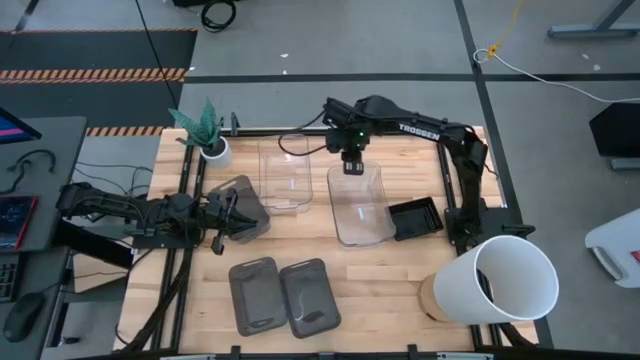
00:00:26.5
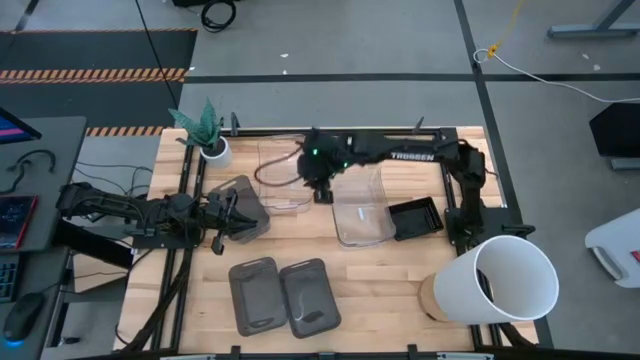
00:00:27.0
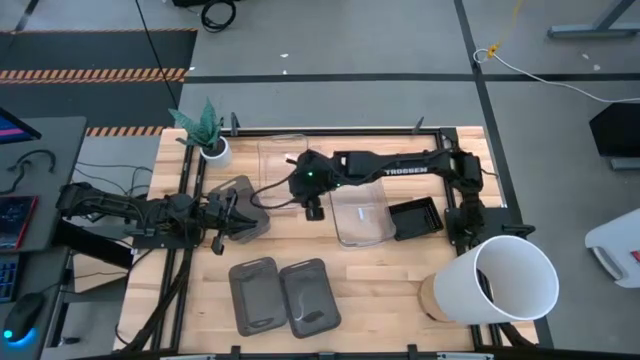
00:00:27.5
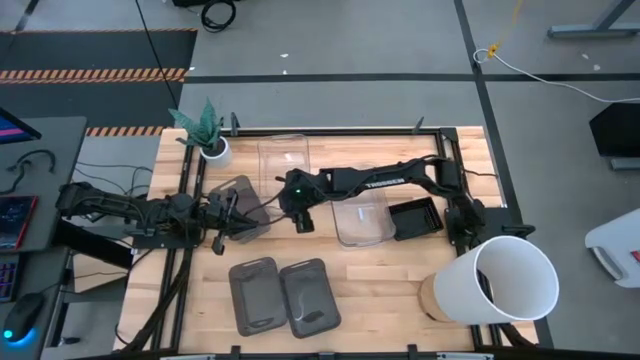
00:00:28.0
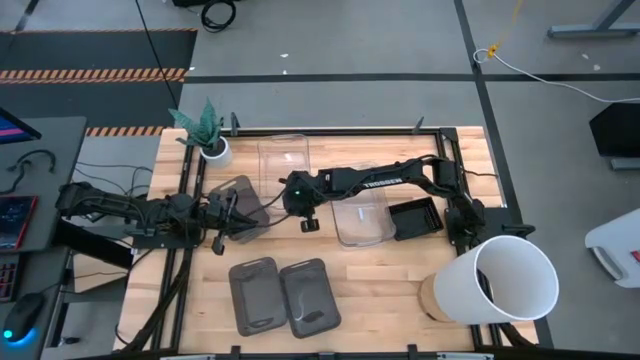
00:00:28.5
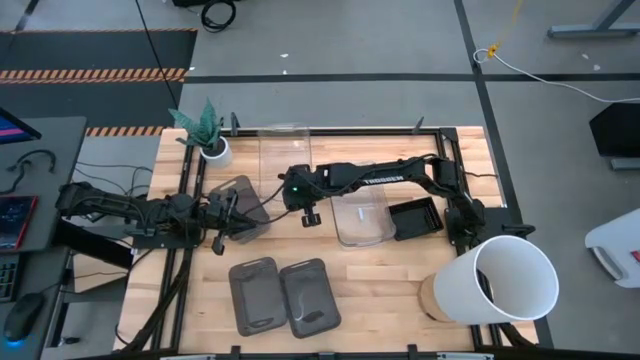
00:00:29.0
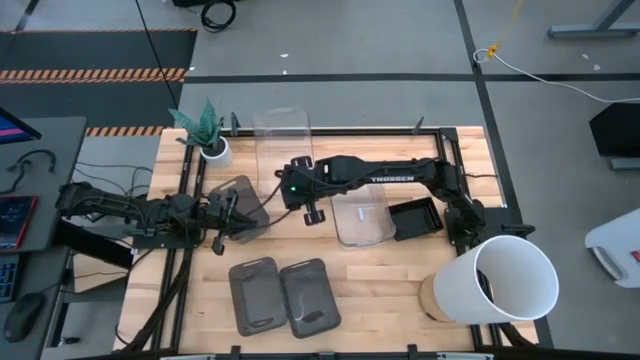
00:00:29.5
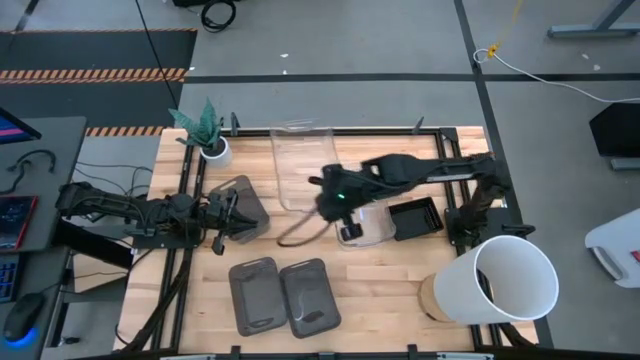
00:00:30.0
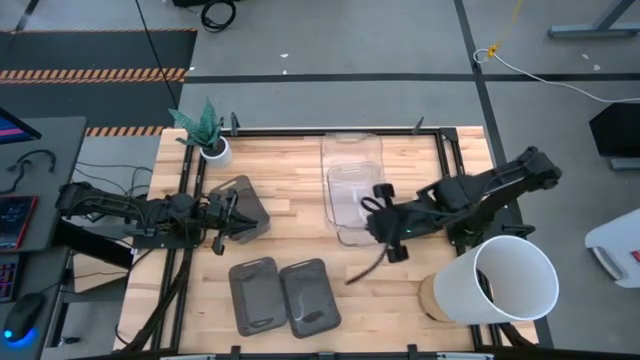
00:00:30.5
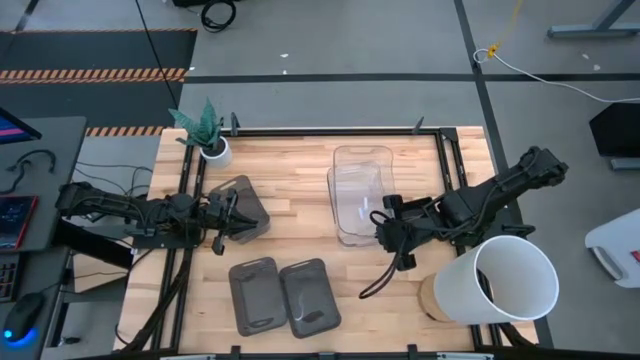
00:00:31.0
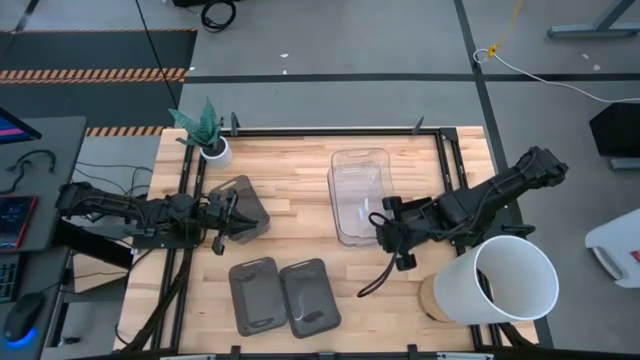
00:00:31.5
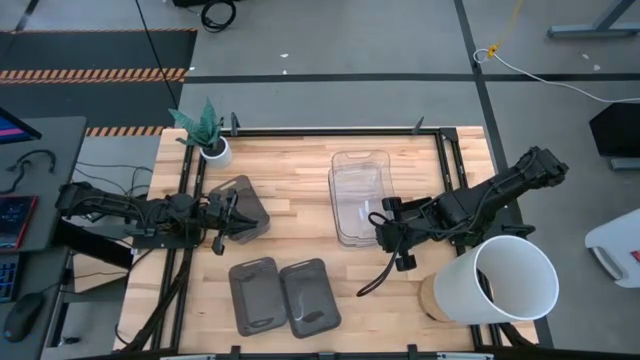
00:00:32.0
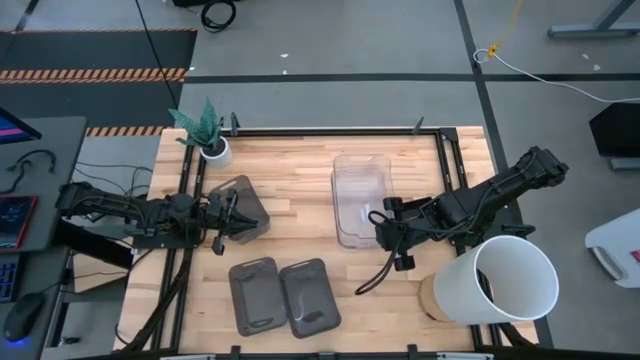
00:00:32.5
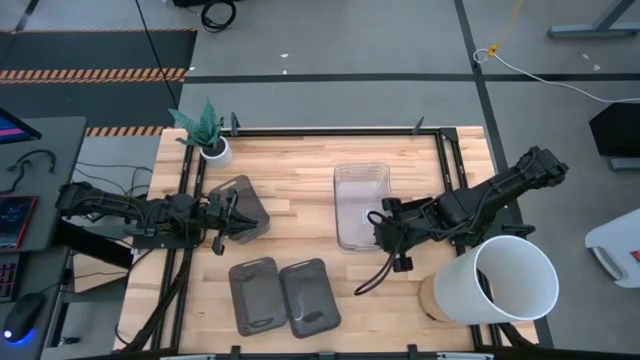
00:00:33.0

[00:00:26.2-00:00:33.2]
Stack the left transparent bin on the stacked right transparent bin

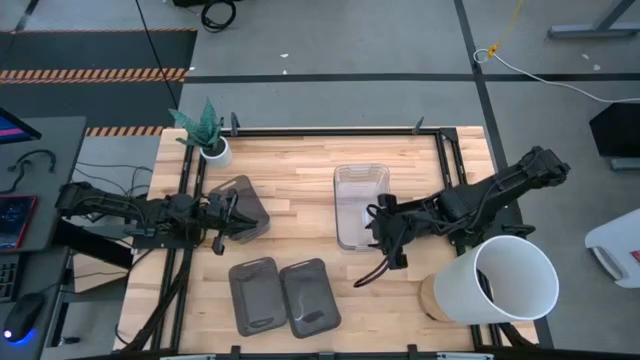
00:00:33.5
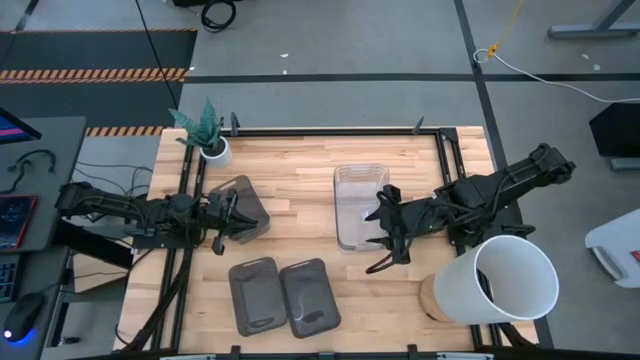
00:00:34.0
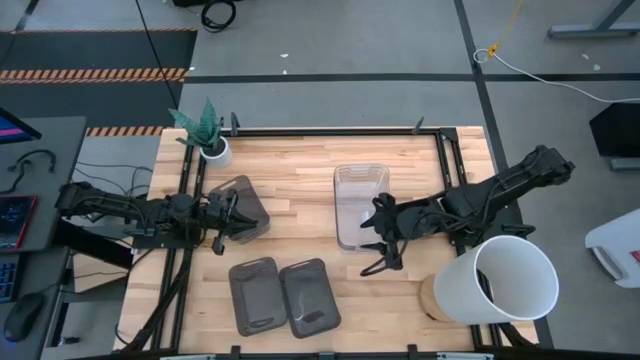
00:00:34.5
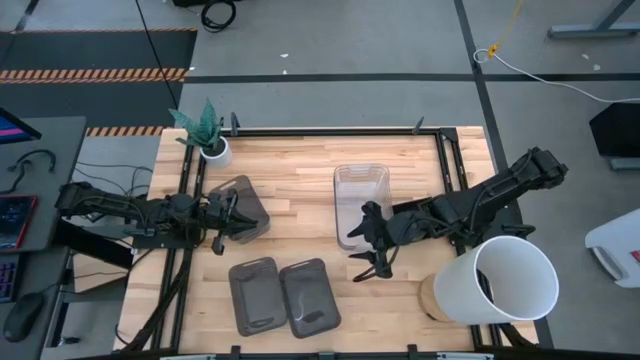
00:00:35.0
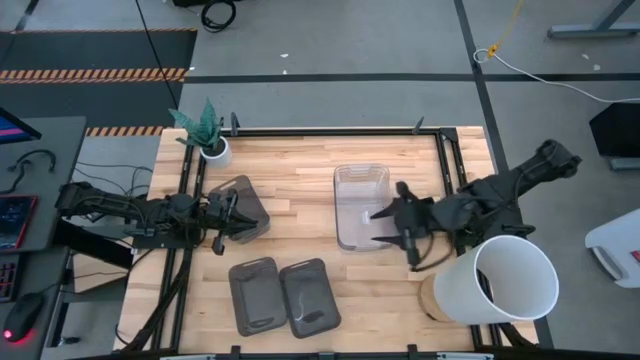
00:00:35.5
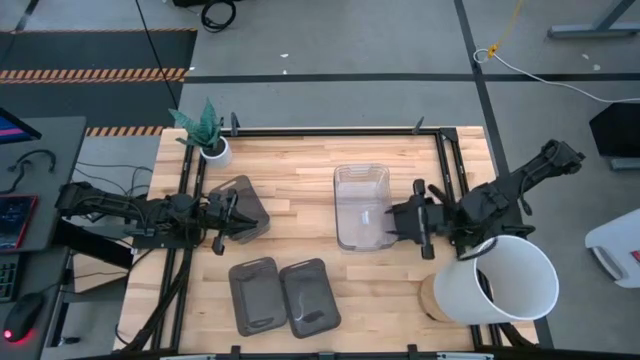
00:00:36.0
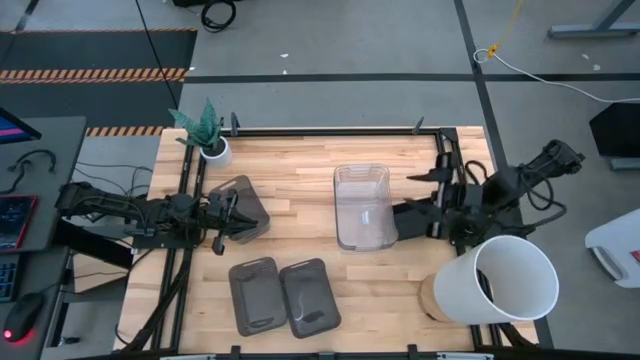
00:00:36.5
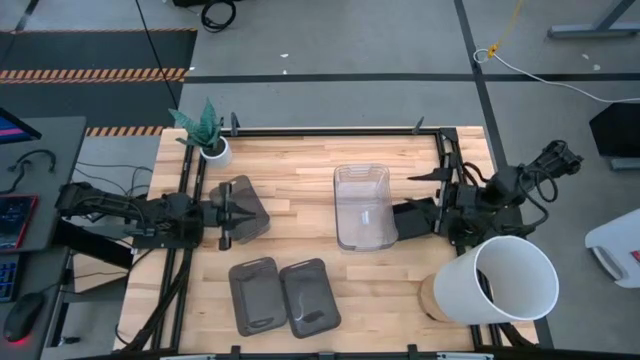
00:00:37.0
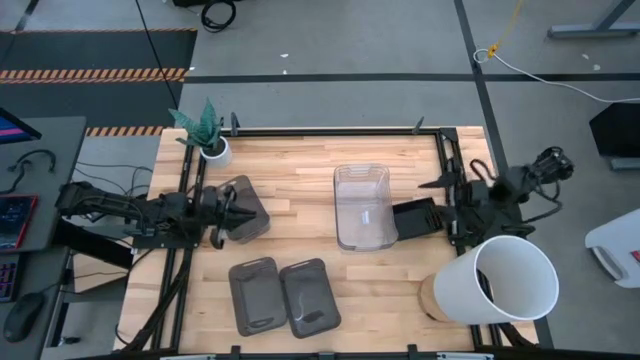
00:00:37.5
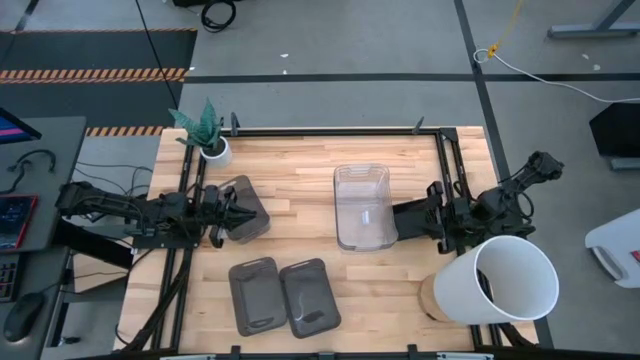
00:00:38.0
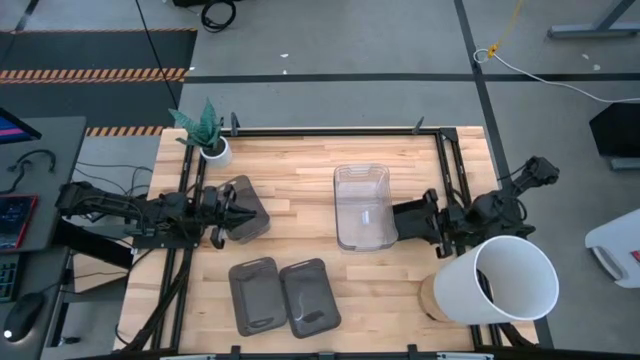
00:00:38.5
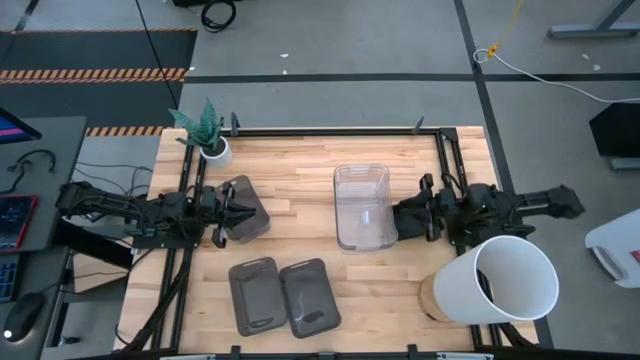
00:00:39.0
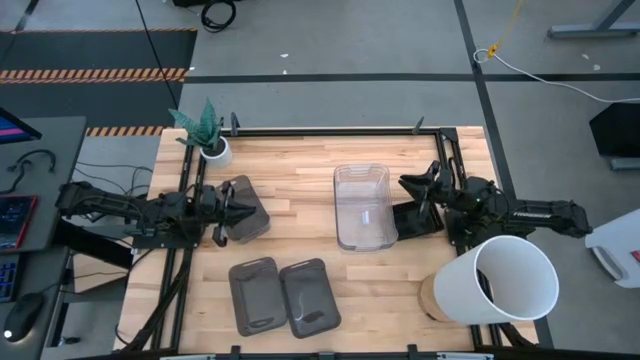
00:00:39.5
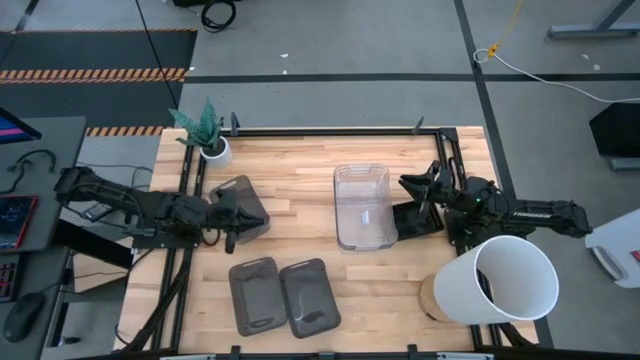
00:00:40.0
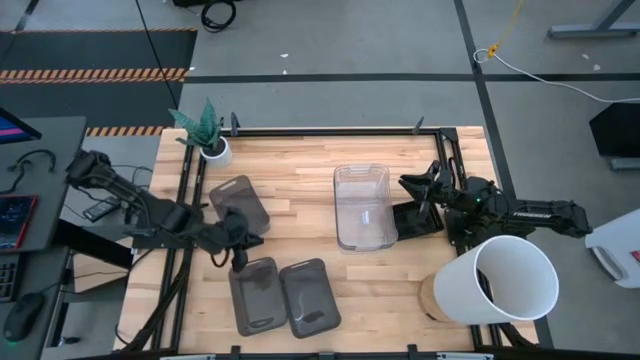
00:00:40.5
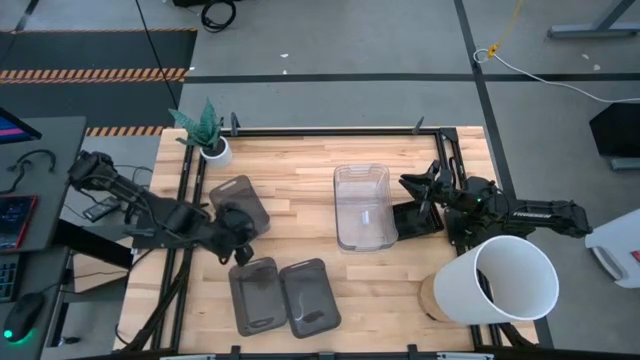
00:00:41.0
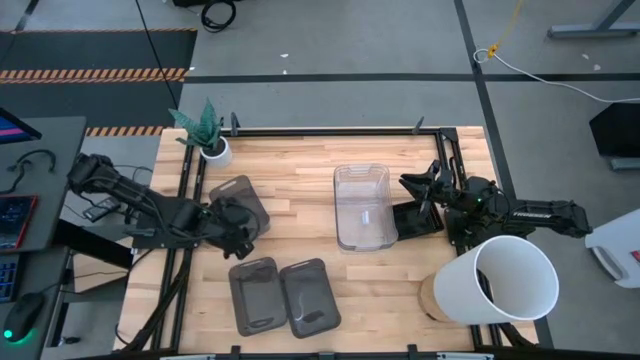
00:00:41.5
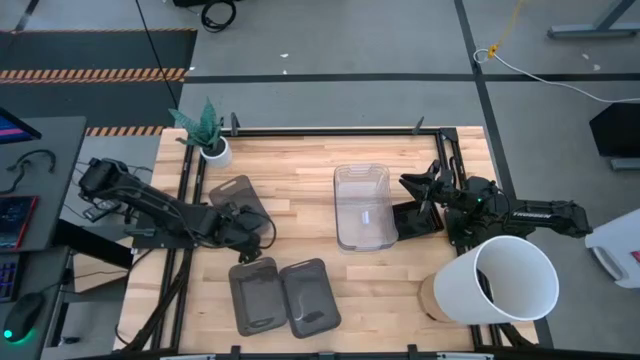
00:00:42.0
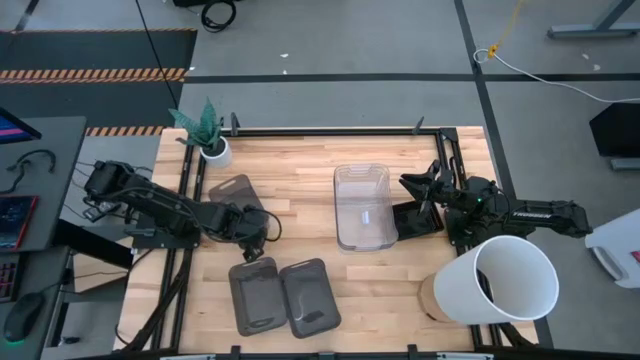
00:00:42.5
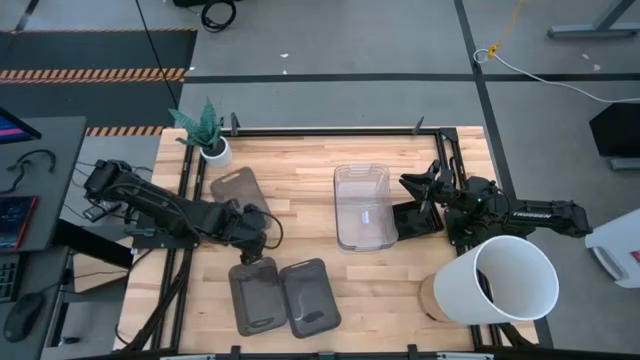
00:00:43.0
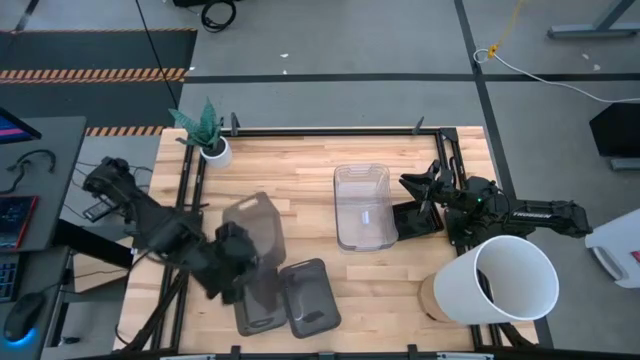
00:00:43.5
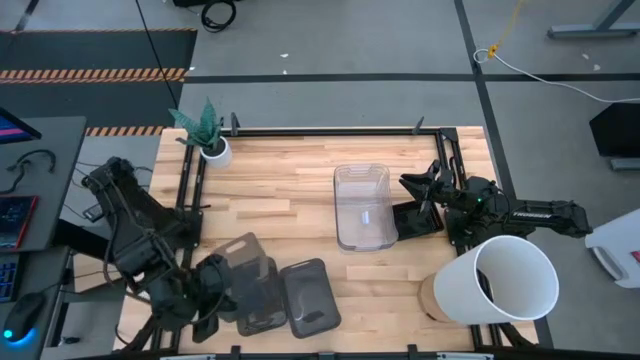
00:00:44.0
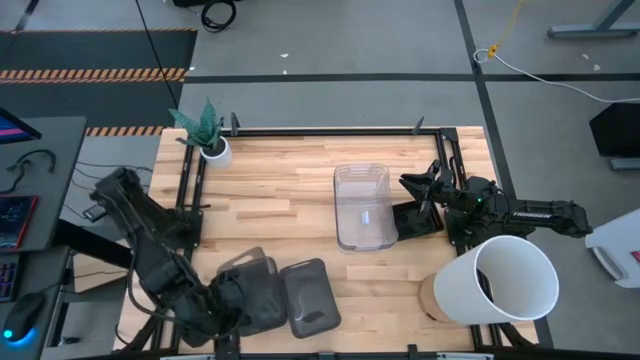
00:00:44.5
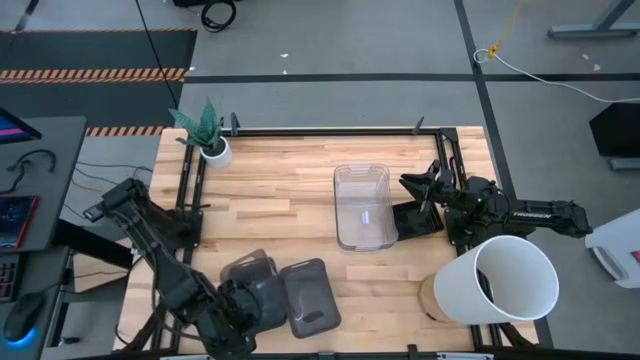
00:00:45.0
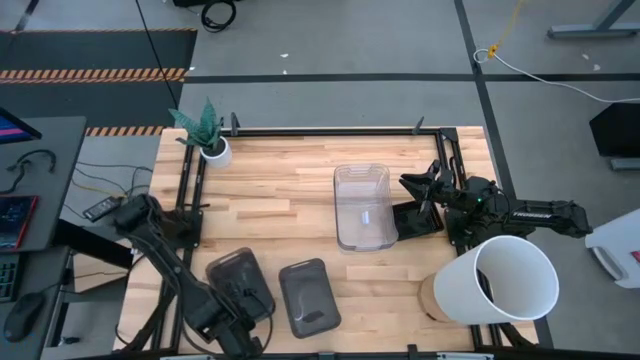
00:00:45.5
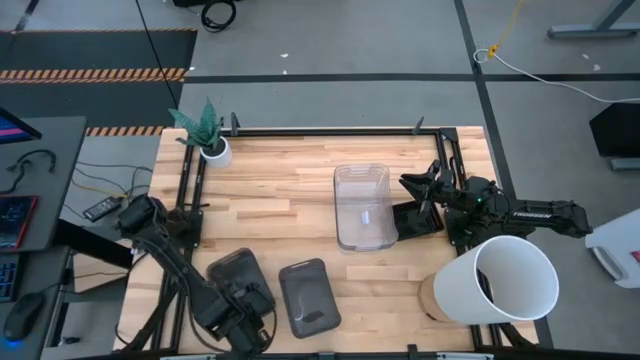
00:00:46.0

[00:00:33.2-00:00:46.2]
Stack the top black transparent bin on the bottom left black transparent bin
